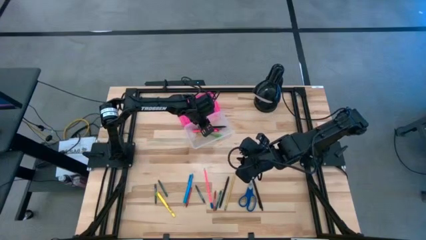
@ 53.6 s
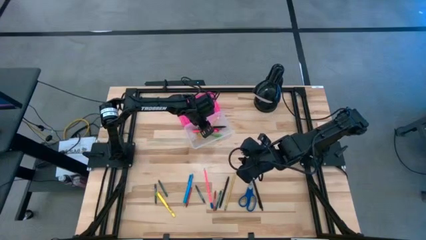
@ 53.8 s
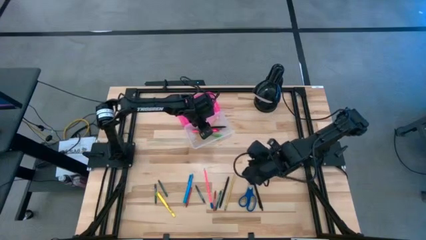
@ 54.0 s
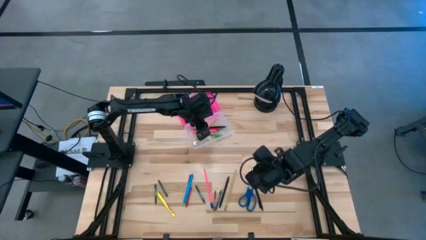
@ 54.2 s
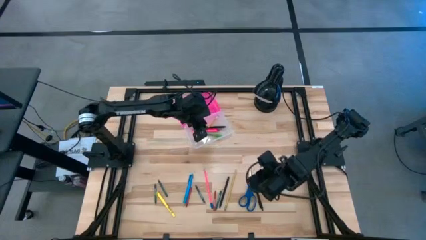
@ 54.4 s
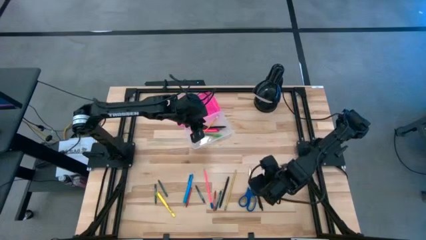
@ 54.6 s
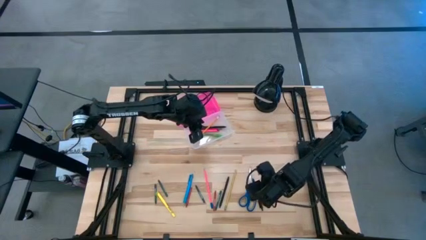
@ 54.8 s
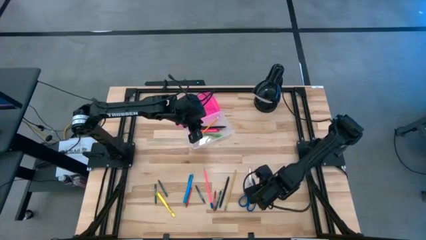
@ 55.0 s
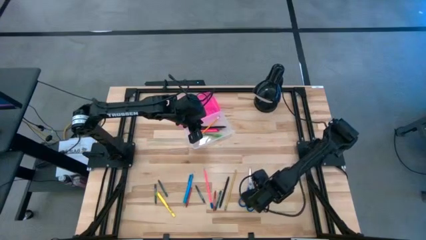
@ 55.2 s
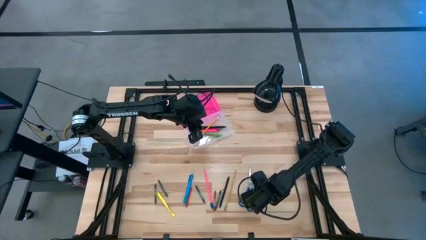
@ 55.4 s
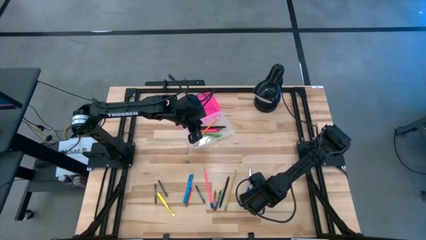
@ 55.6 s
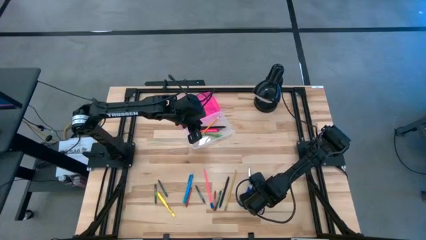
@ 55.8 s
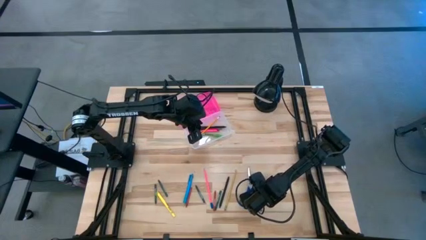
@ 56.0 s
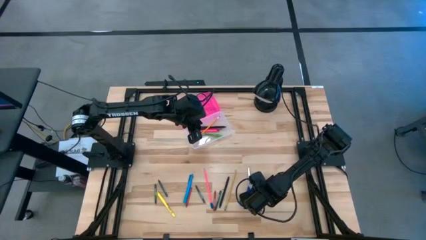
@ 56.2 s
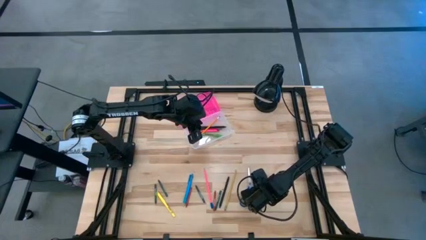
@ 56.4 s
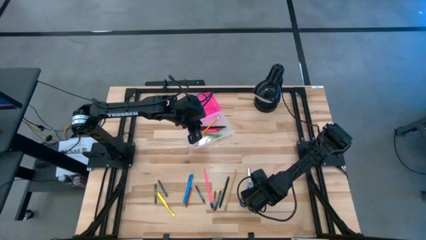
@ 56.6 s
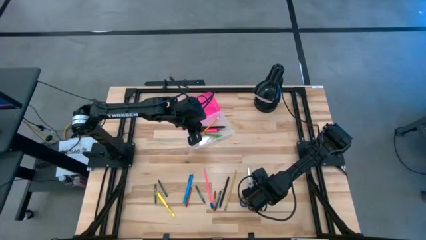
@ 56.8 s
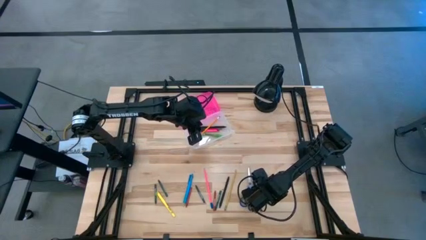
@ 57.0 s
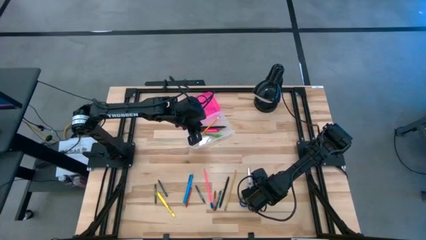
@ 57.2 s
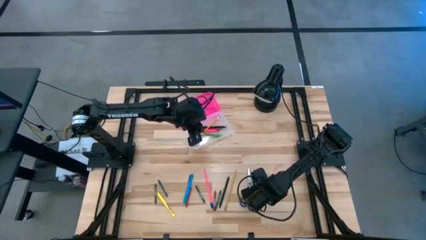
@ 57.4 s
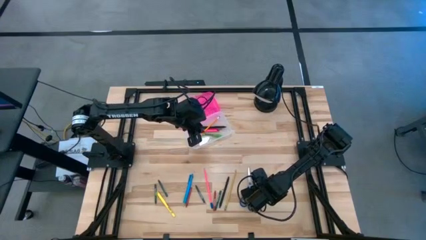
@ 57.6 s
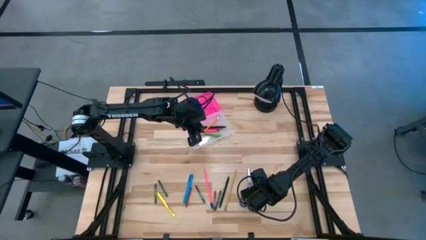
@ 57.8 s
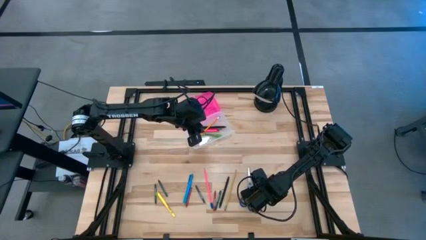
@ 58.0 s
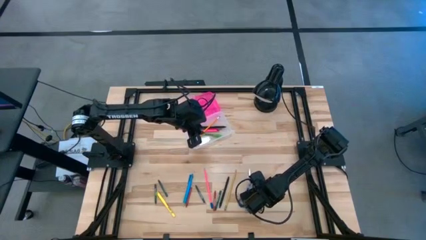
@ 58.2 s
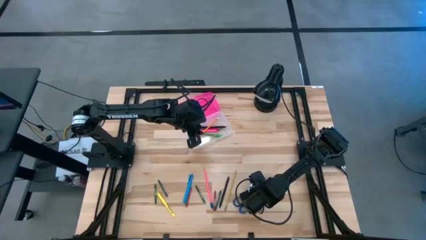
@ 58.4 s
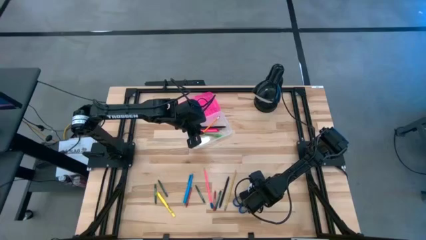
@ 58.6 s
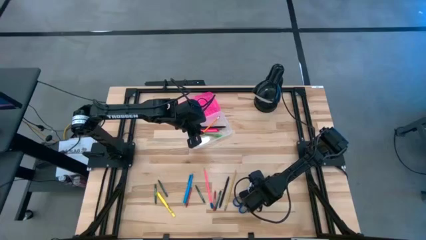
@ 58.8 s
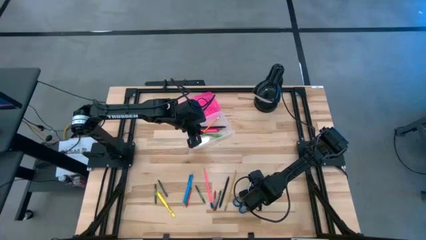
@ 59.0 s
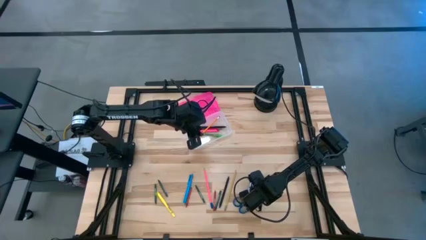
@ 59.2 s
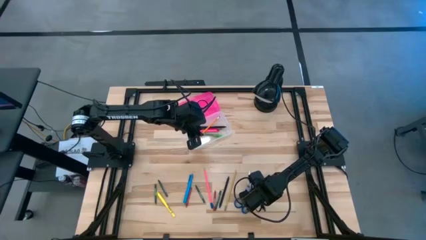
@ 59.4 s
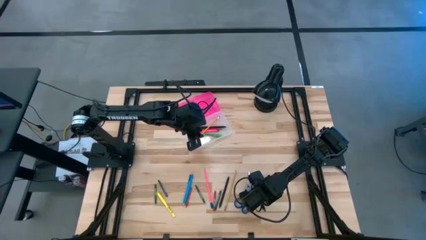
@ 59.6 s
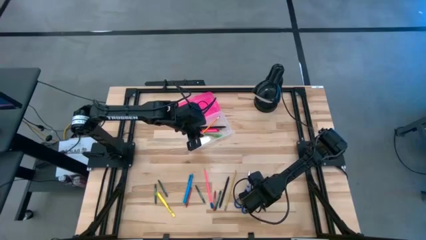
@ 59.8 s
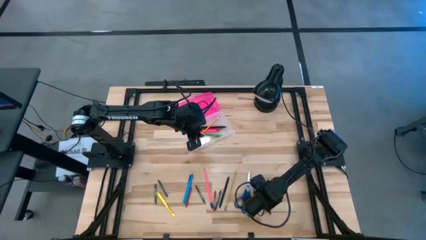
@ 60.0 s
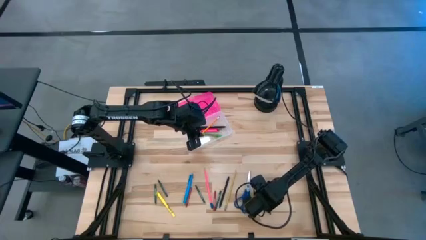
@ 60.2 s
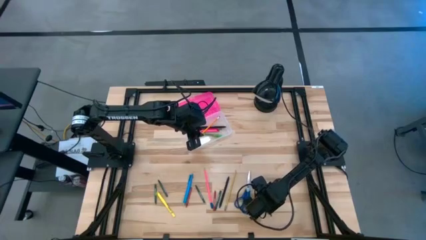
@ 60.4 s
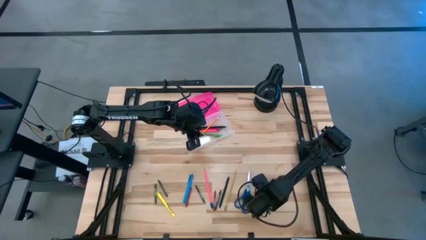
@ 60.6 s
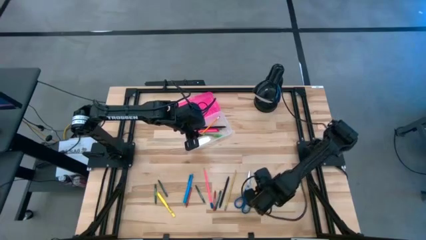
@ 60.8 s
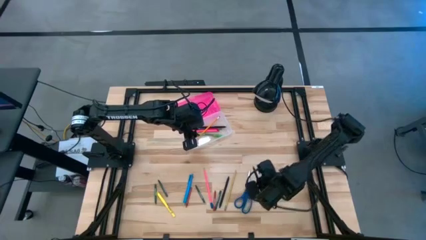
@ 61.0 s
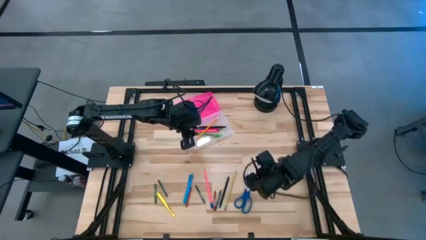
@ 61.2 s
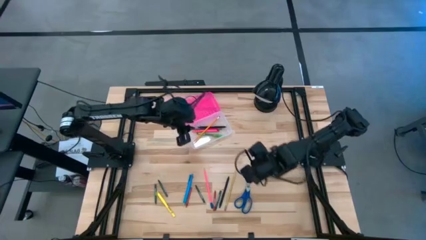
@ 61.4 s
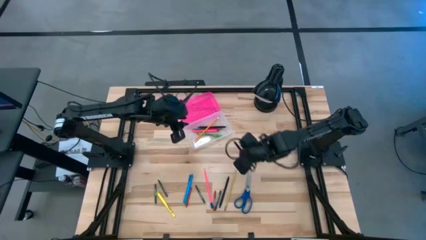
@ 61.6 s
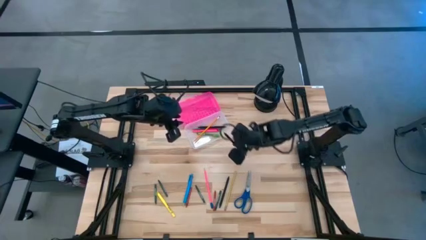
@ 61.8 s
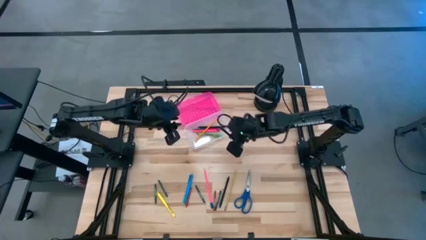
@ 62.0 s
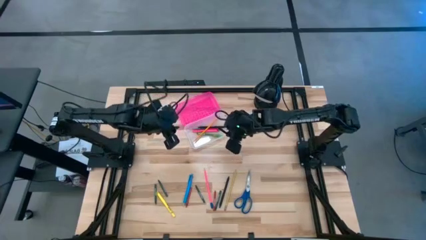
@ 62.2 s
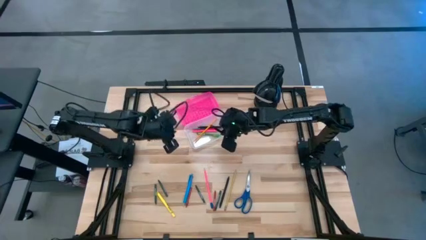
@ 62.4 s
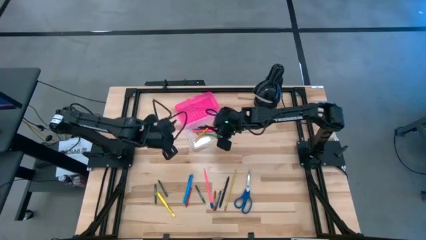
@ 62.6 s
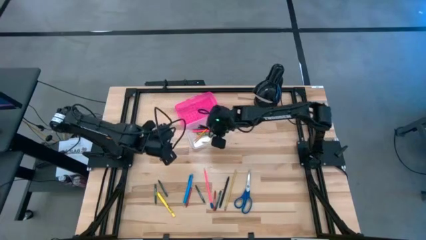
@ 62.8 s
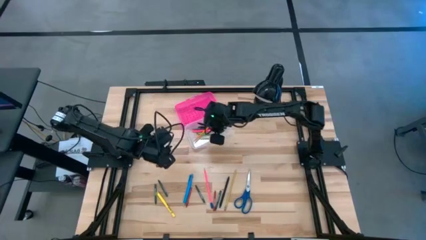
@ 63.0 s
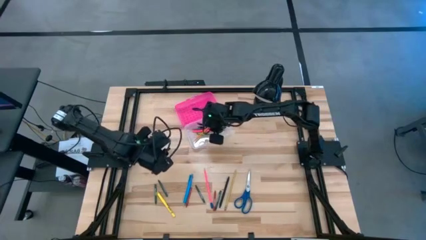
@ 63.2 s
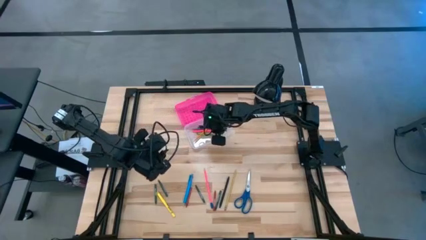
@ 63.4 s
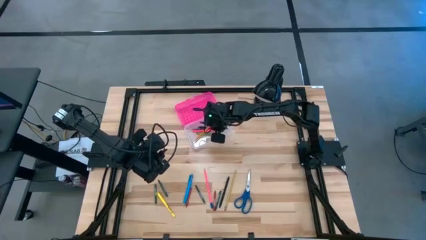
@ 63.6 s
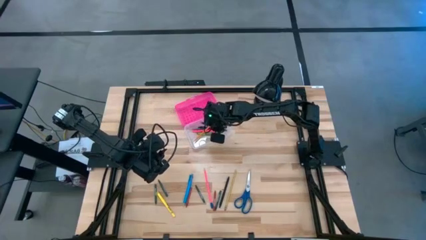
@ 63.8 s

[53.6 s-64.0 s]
Task: Pick & place school supplies into a supply box
Put the black pen into the pink supply box

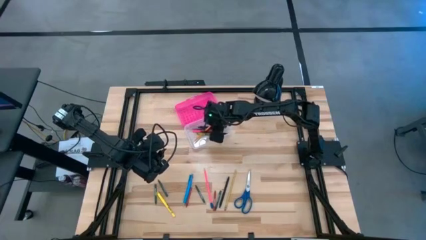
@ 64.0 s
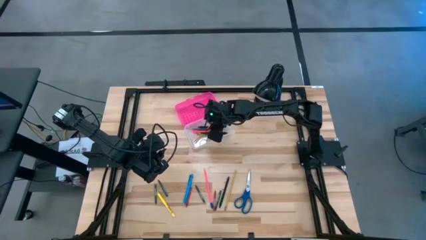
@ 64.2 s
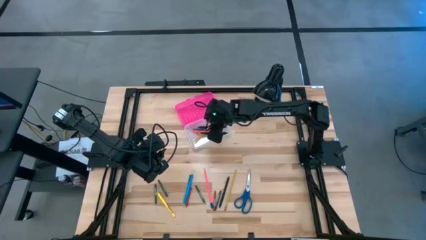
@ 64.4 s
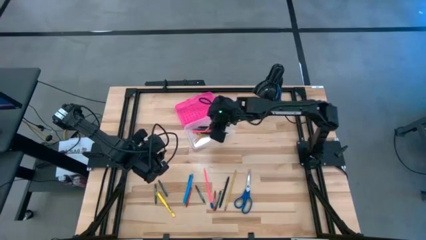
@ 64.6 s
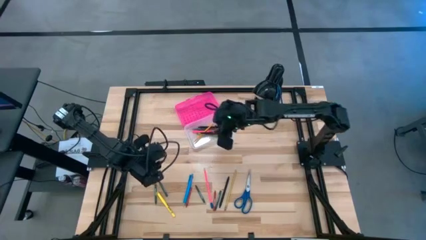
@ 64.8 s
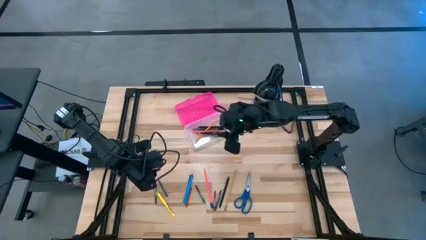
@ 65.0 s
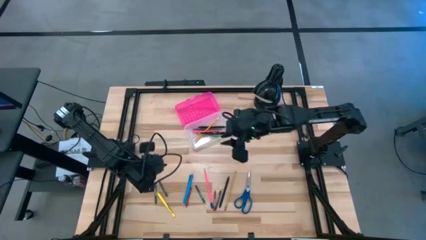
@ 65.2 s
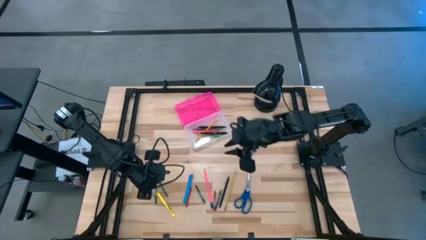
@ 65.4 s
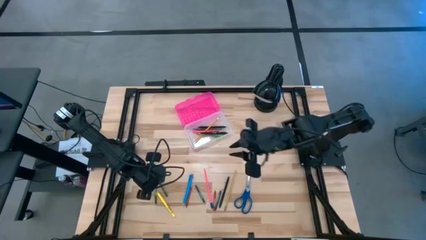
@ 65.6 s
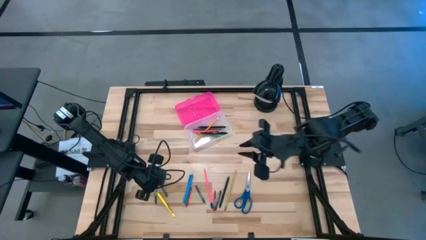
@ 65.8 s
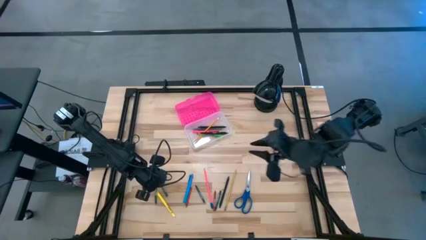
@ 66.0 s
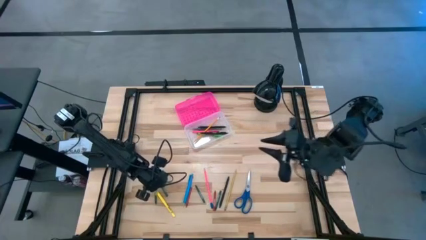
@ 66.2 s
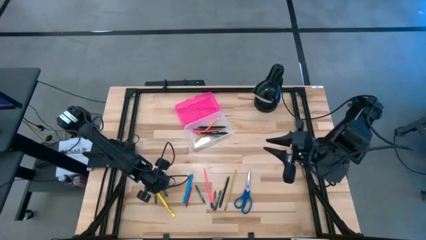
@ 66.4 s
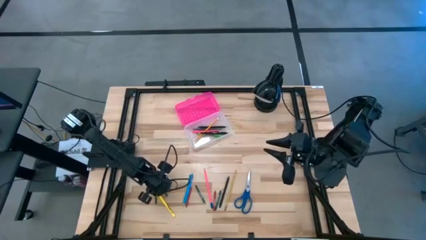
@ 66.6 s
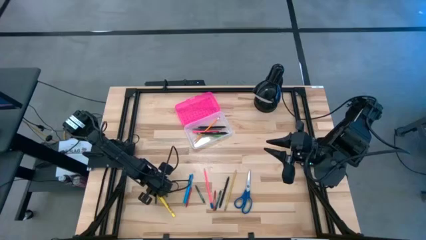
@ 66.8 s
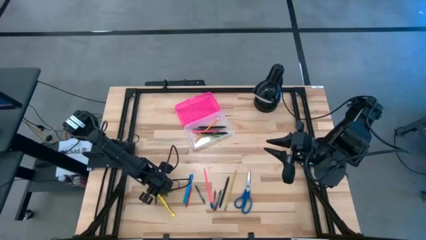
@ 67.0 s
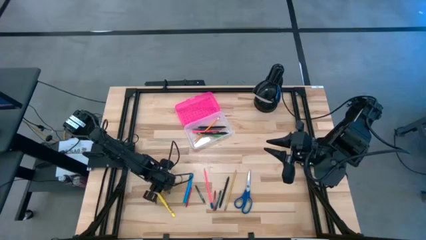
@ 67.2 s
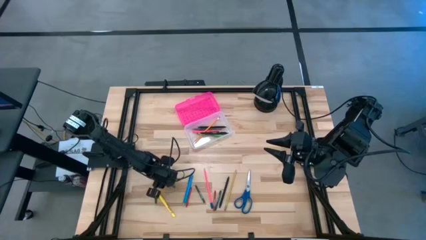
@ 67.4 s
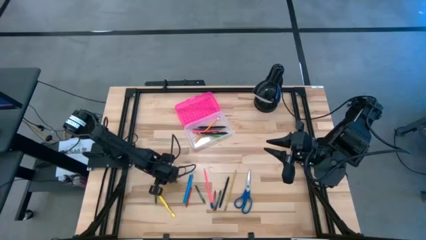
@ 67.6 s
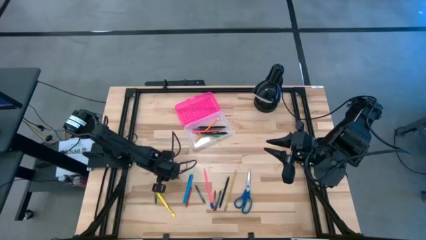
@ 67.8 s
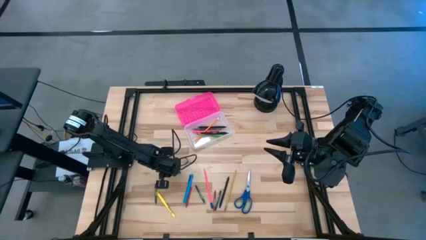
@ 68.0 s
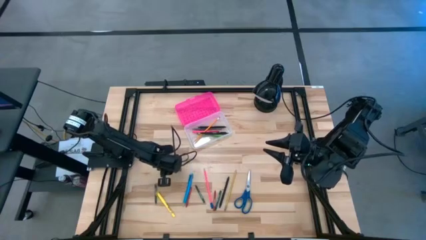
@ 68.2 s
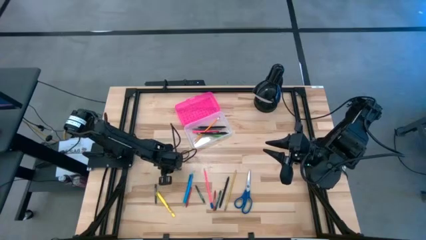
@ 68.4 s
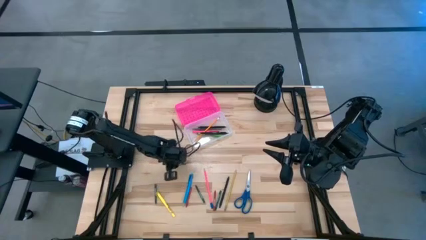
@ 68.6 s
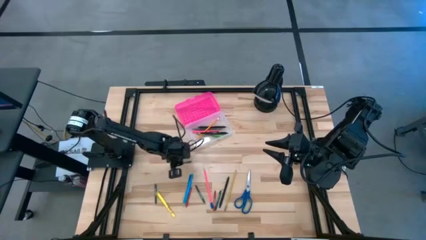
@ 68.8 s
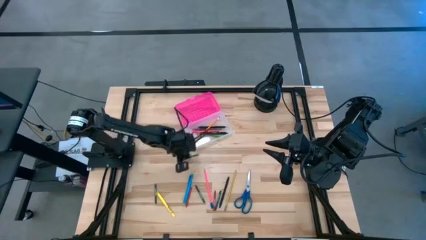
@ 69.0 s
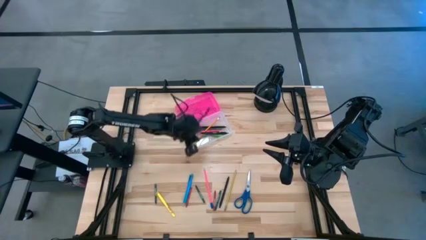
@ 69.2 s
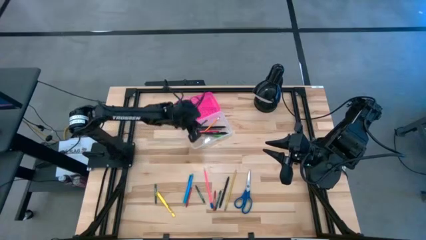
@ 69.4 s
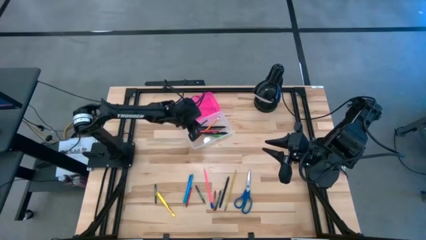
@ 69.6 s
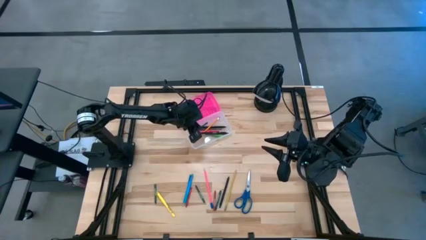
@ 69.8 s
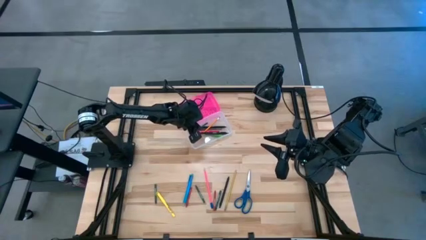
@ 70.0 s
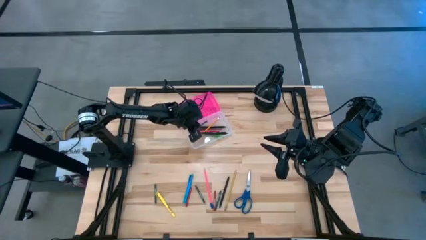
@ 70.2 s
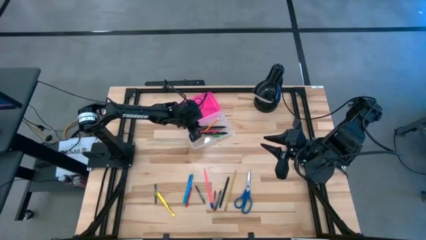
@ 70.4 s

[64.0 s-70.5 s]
Put the green crayon into the pink supply box
